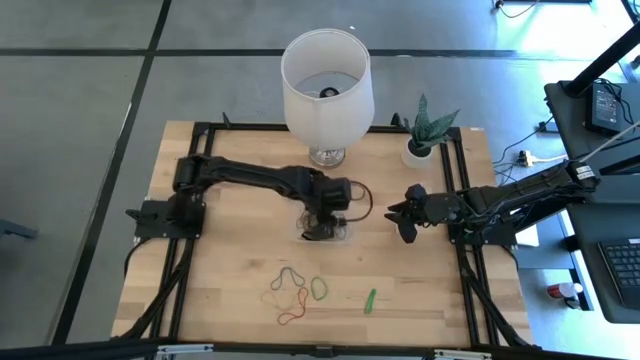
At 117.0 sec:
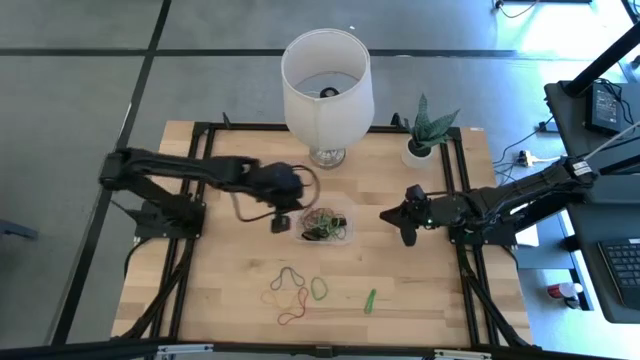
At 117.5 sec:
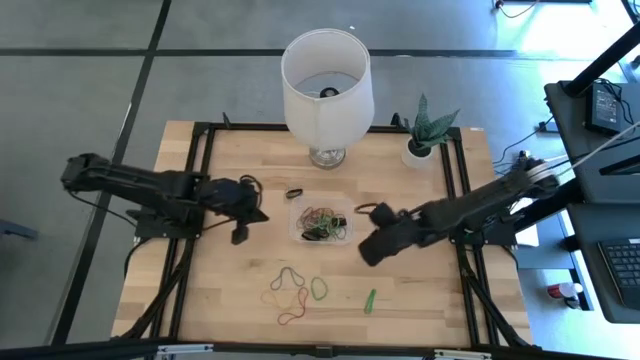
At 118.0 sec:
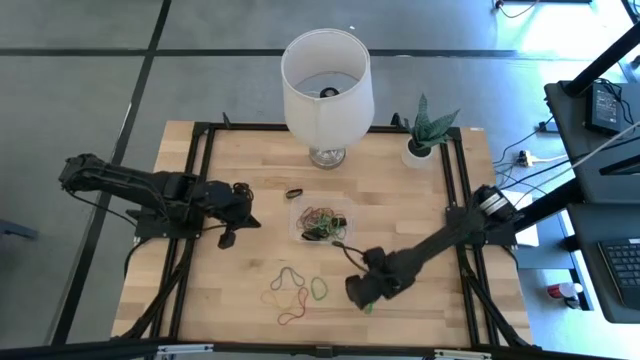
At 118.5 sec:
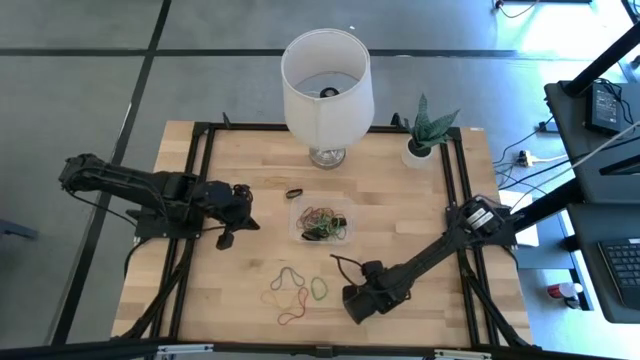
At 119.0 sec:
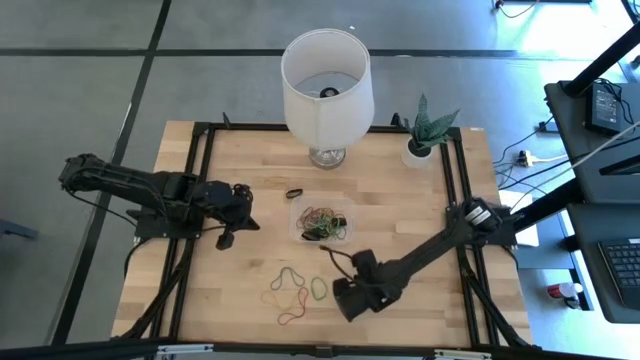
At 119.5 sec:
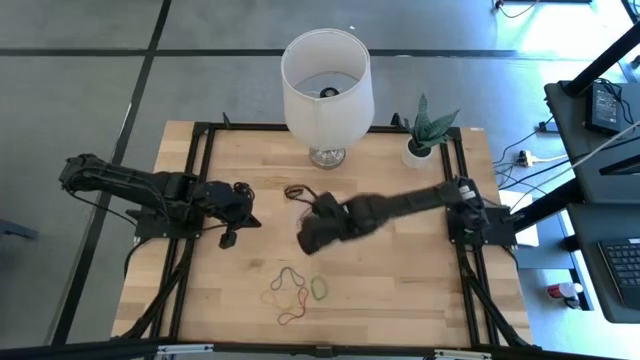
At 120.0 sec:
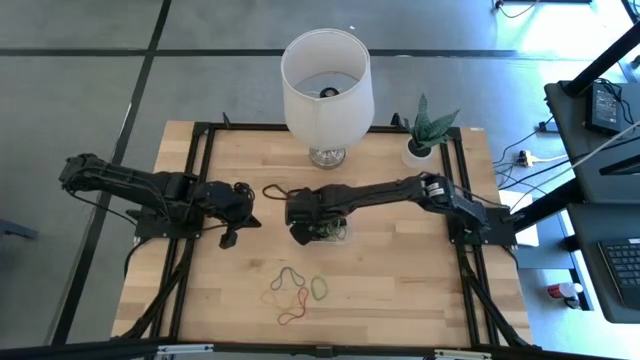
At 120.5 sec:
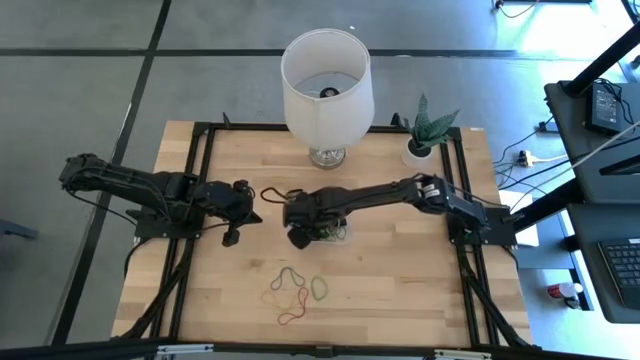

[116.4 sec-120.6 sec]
Task: Pick and place rubber bands into bin
Put the top right green rubber band into the container

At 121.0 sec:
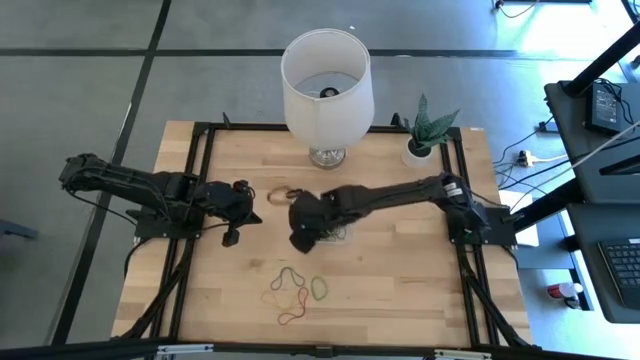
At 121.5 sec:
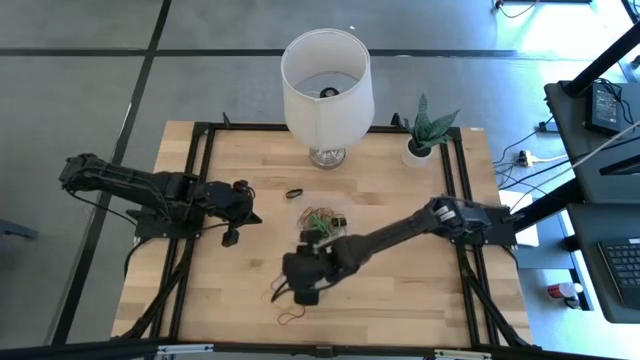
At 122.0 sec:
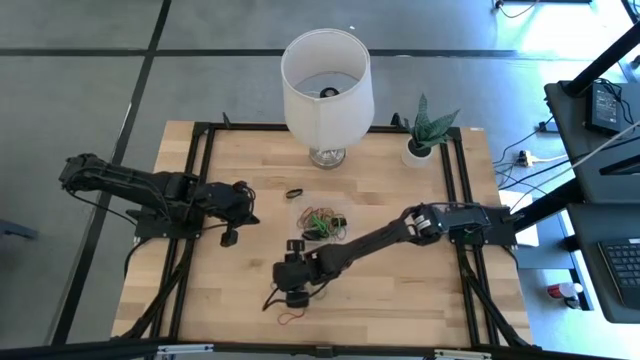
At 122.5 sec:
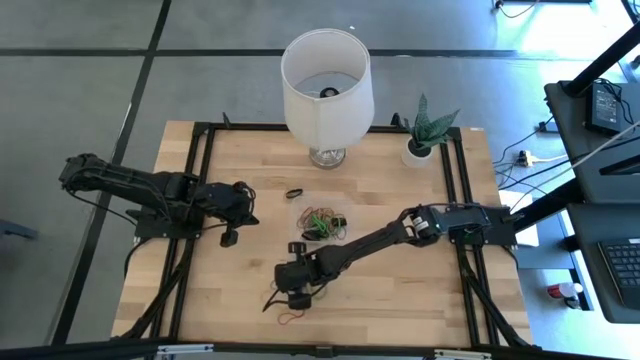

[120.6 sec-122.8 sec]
Put the blue rubber band into the container

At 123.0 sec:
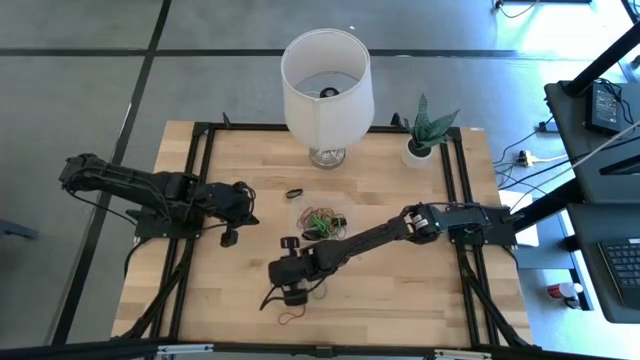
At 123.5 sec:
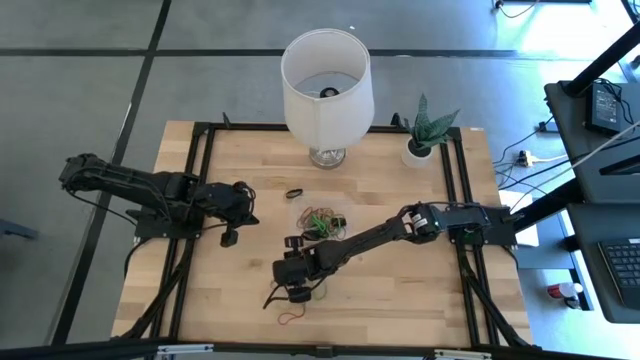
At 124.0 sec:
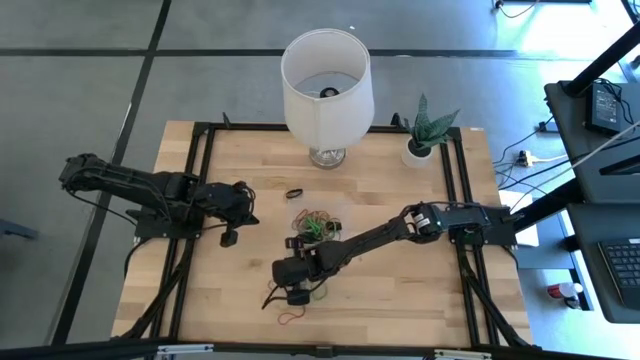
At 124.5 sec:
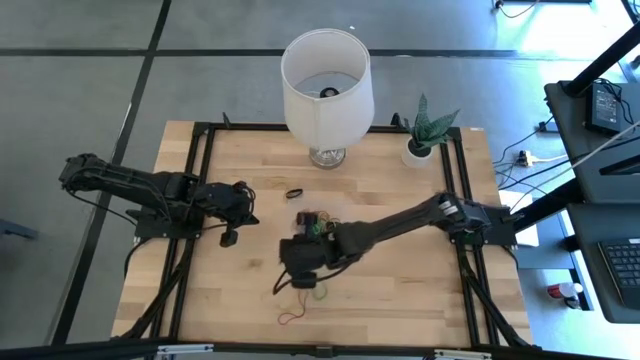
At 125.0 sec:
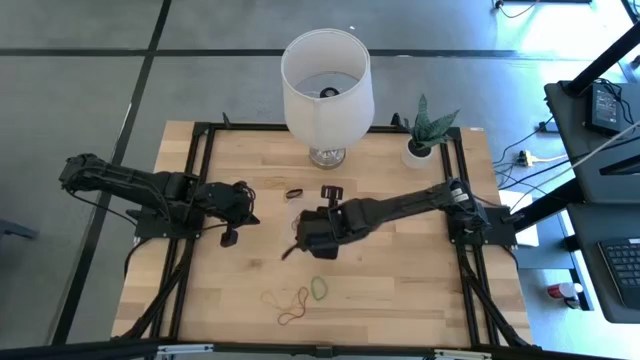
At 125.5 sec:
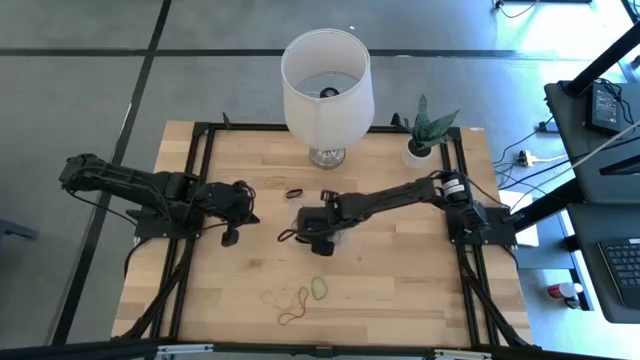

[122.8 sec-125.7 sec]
Put the blue rubber band into the container

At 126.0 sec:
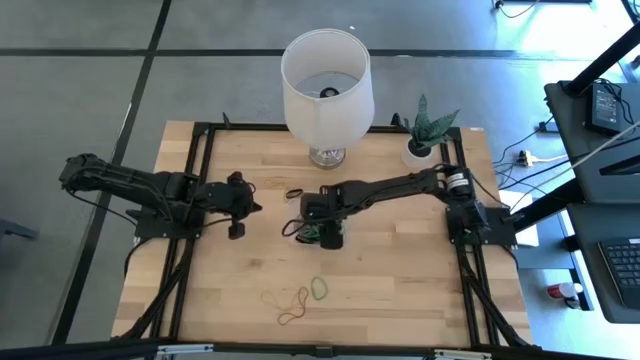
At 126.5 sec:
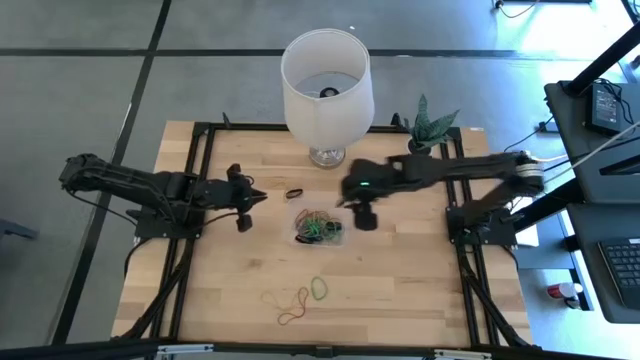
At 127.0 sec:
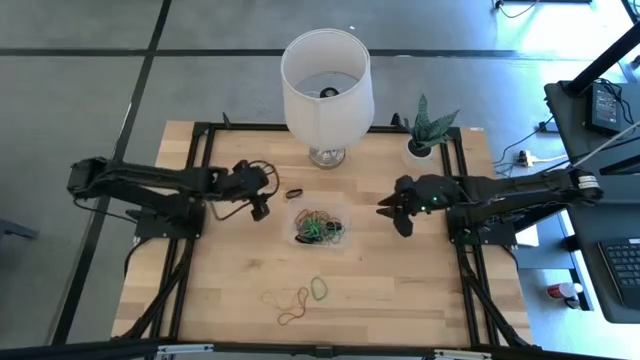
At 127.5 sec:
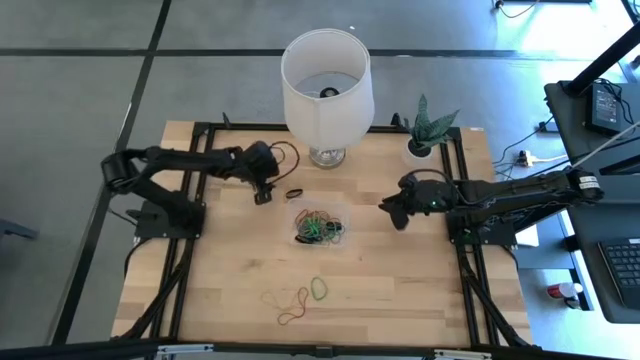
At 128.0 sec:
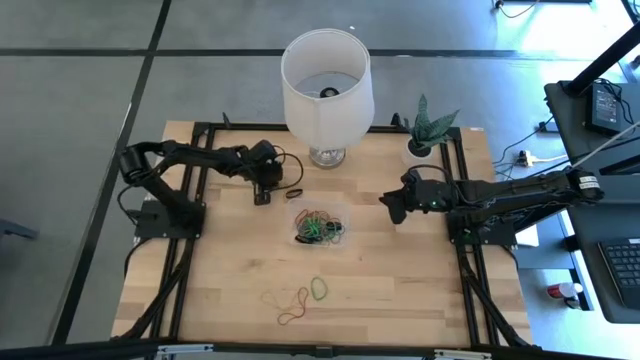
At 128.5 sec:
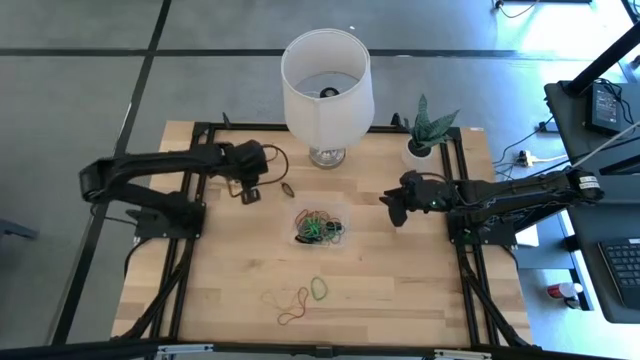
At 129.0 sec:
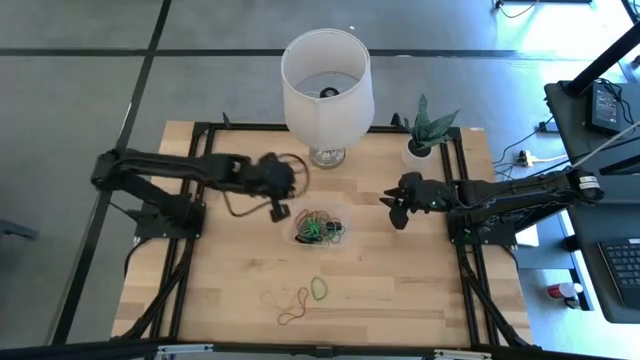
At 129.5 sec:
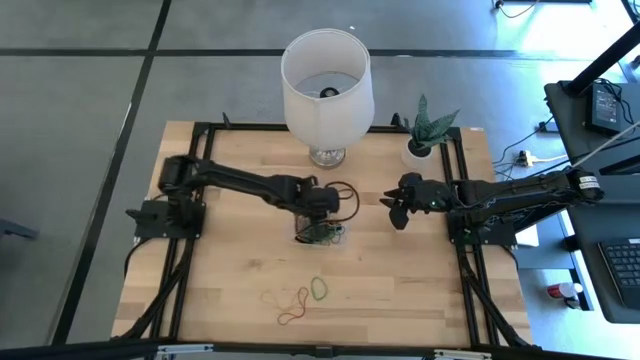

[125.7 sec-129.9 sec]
Put the left yellow rubber band into the container

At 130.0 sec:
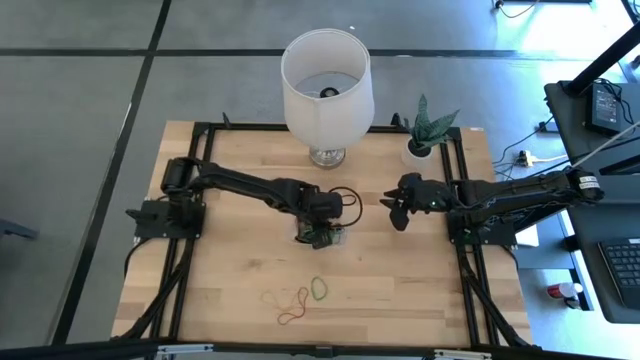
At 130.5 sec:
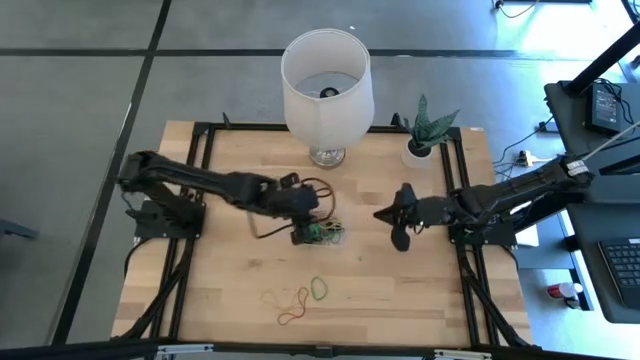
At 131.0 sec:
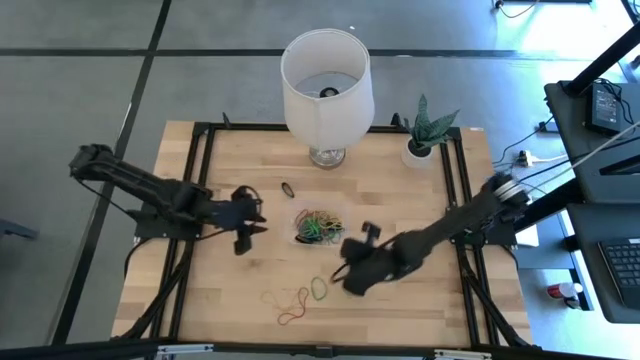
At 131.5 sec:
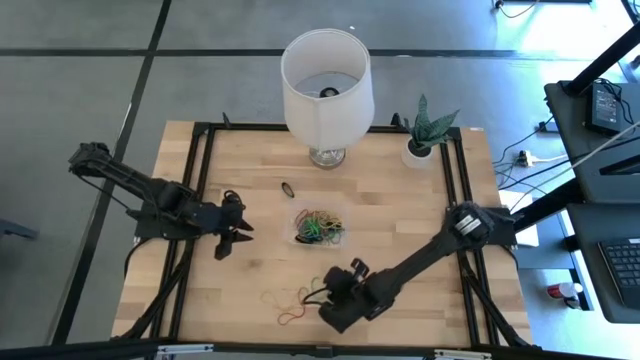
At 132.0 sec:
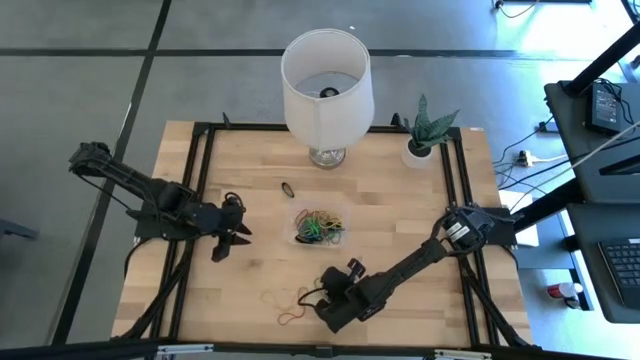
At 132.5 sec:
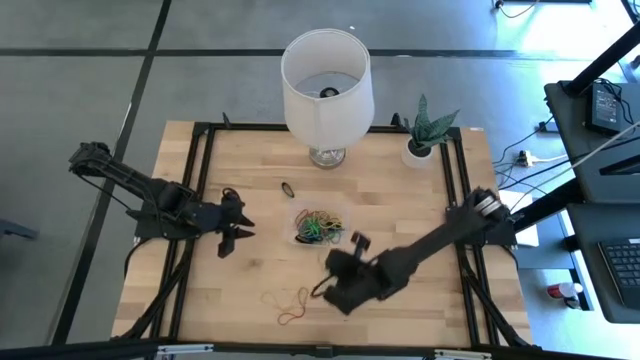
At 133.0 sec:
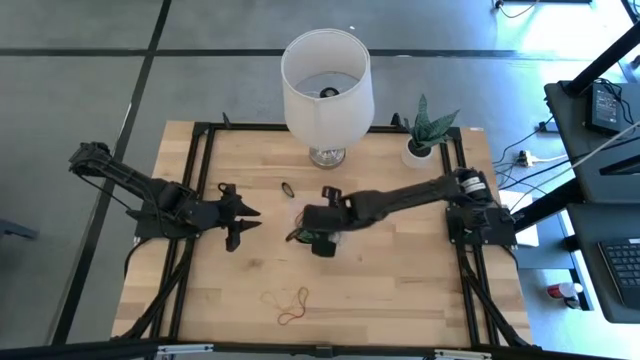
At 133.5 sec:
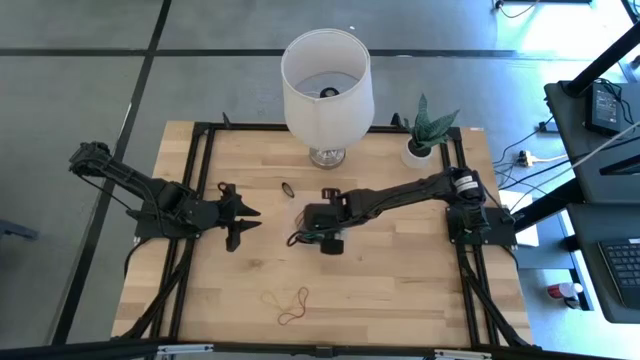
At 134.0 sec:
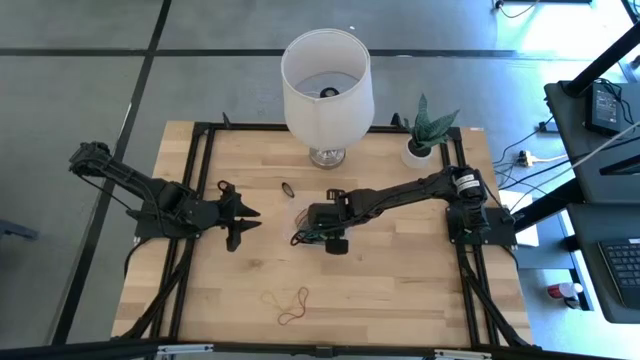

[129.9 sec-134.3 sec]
Put the green rubber band into the container

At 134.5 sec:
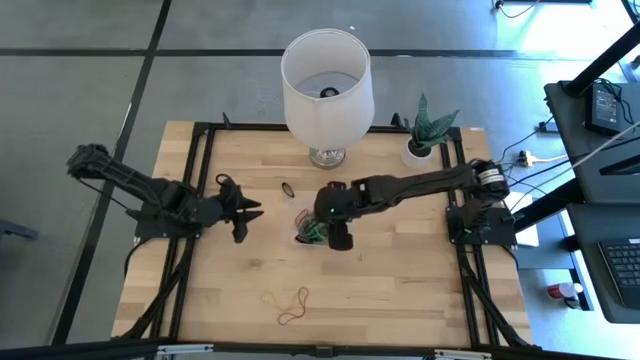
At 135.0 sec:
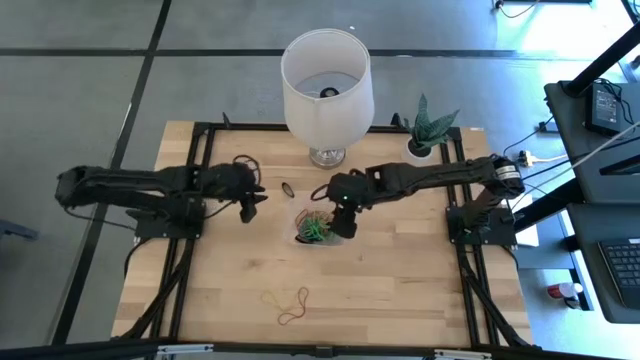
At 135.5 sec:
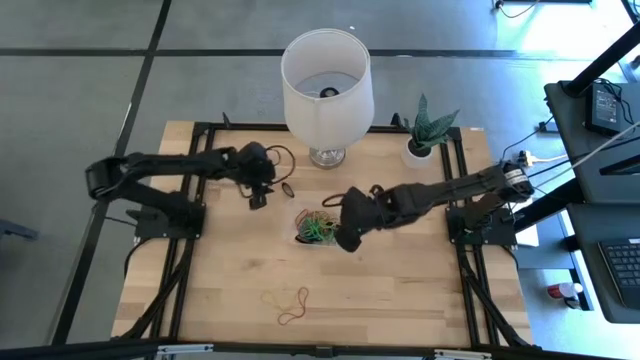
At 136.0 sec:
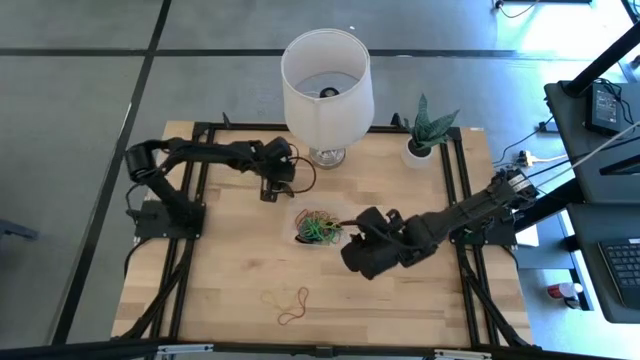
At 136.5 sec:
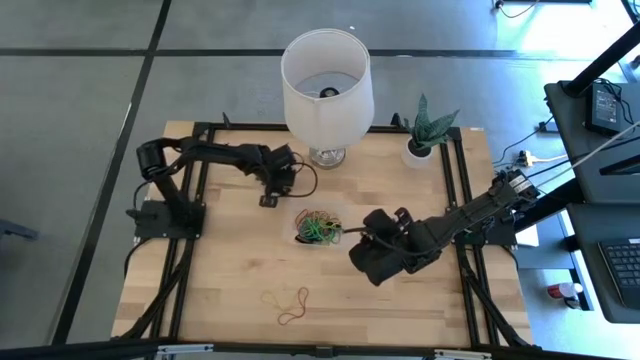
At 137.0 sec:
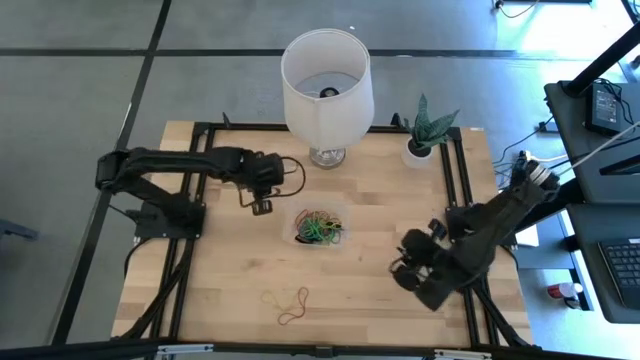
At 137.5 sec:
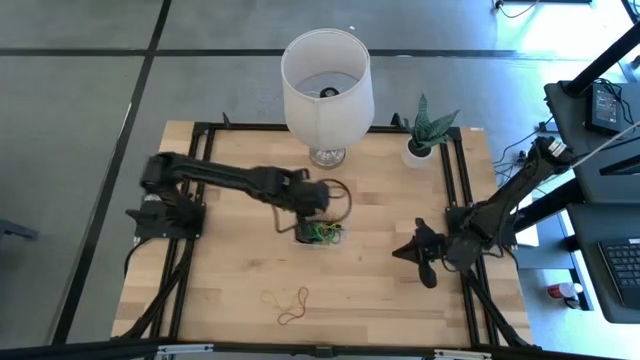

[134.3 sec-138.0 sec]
Put the black rubber band into the container
